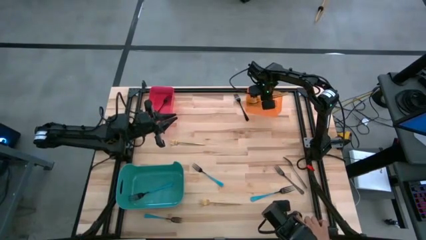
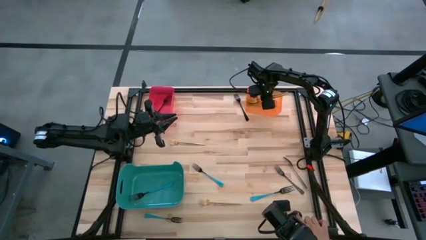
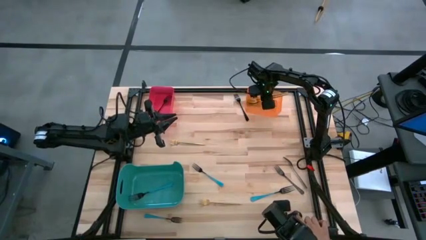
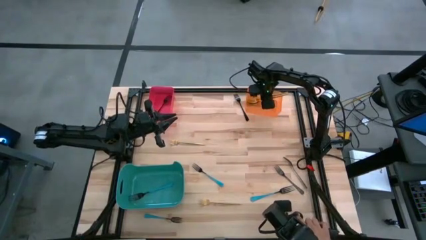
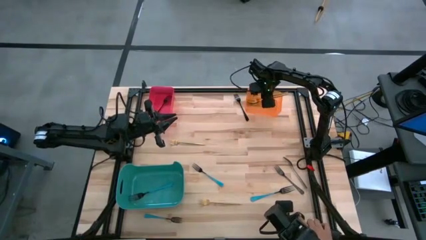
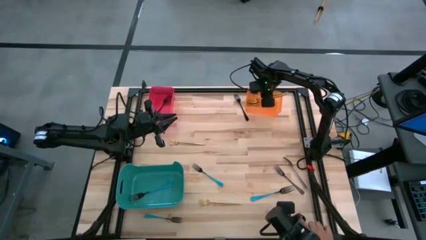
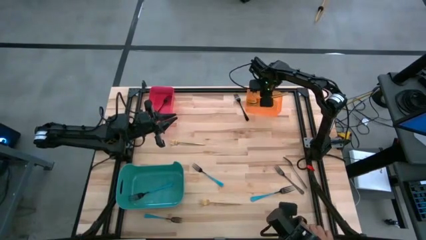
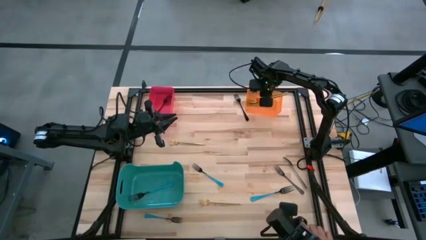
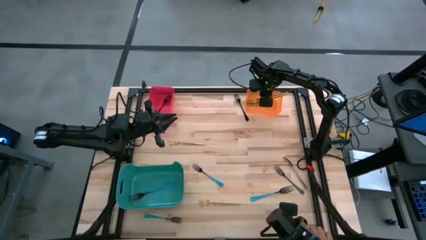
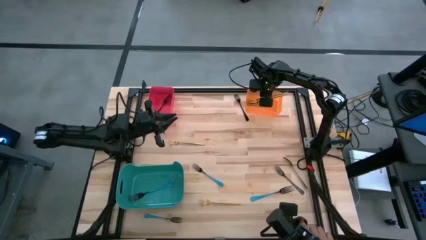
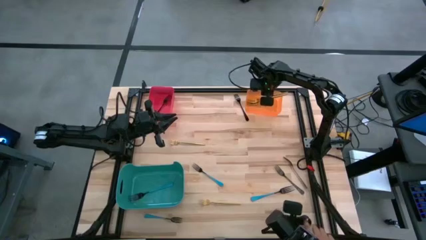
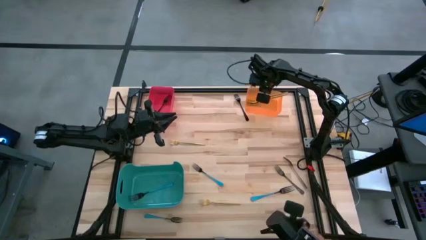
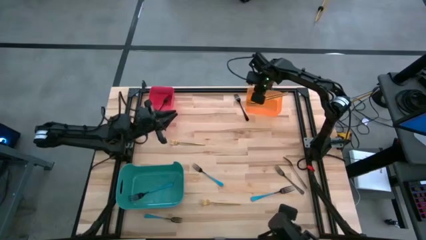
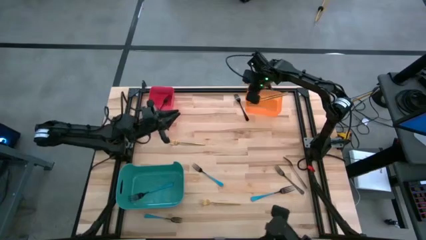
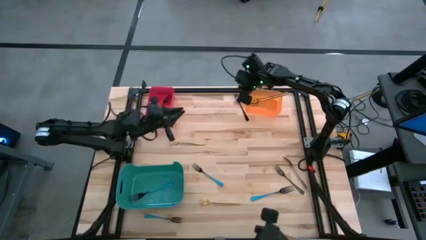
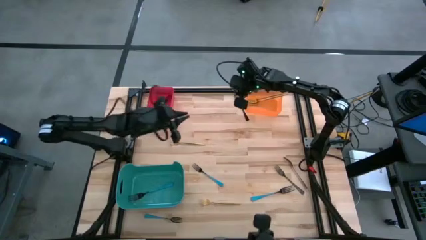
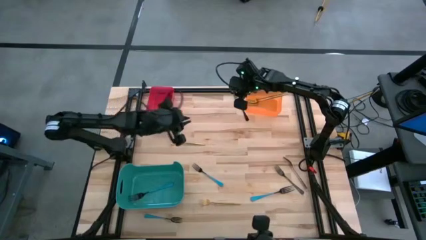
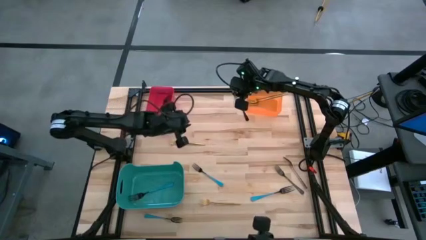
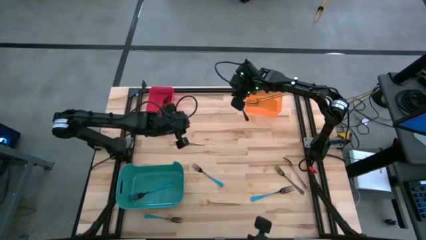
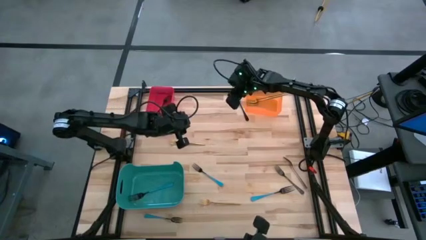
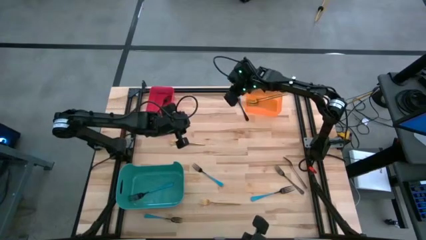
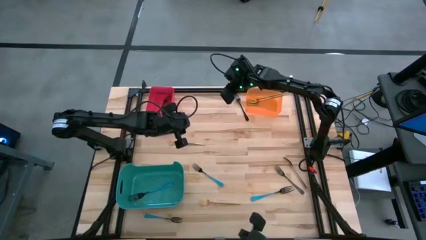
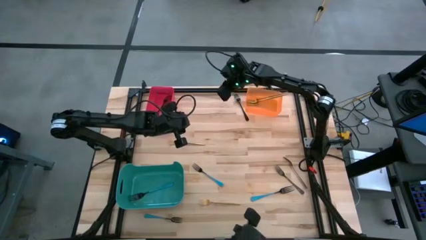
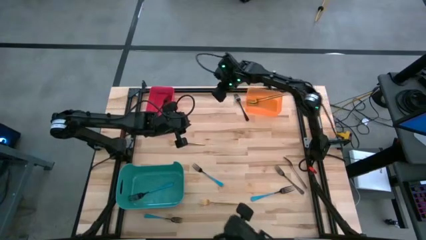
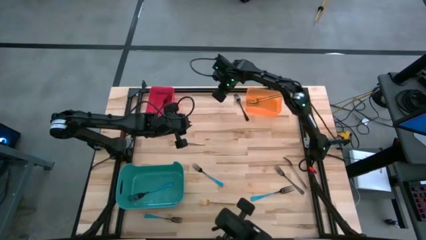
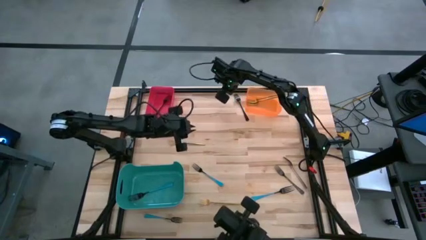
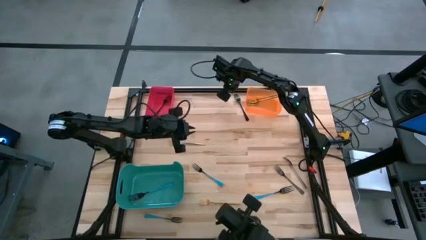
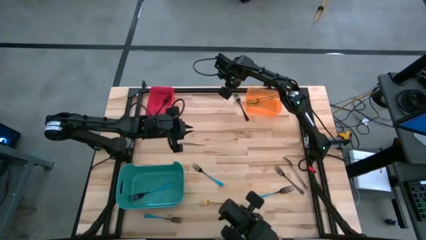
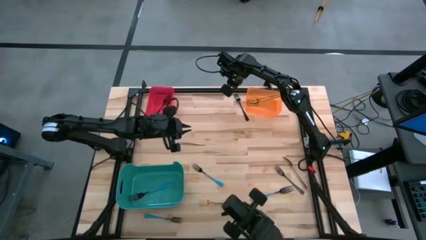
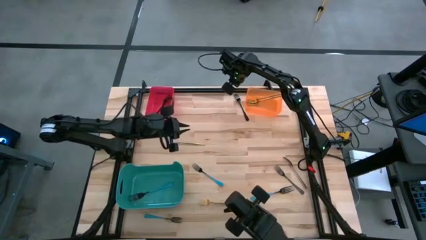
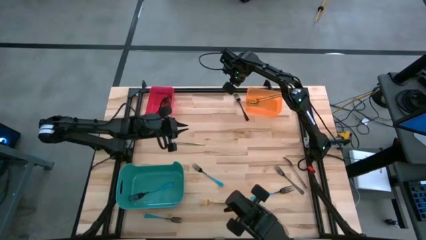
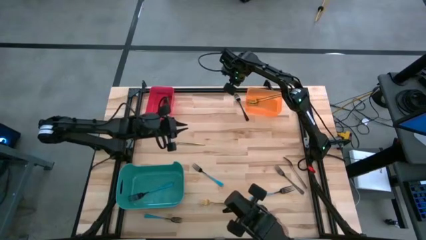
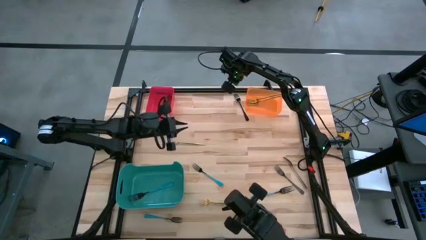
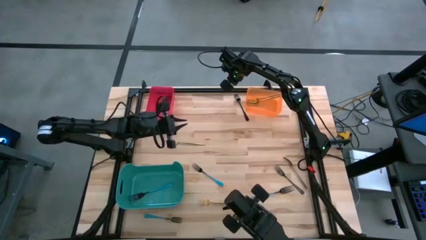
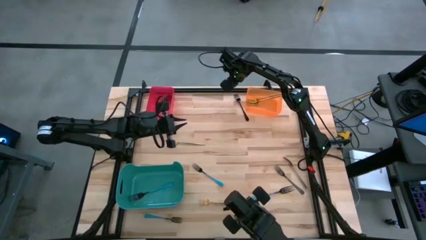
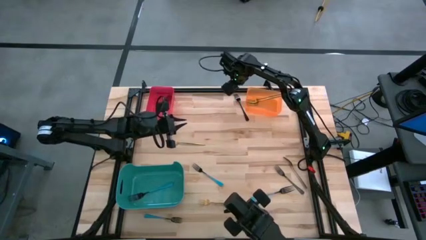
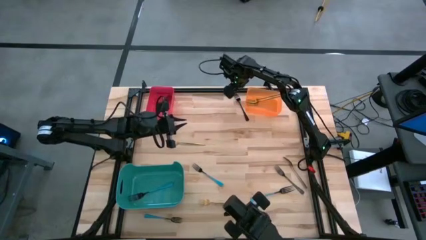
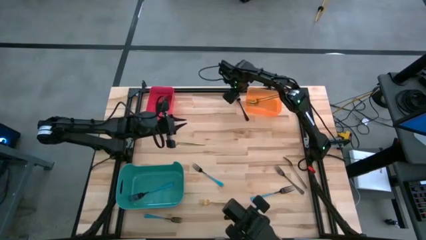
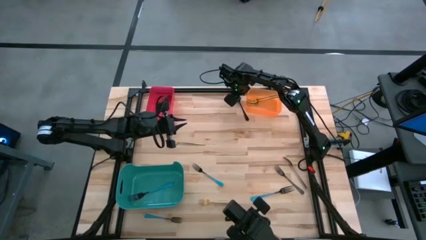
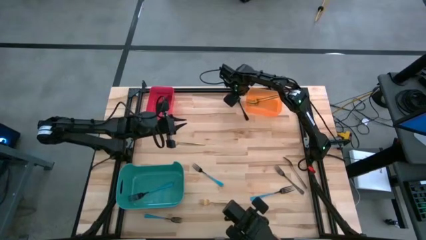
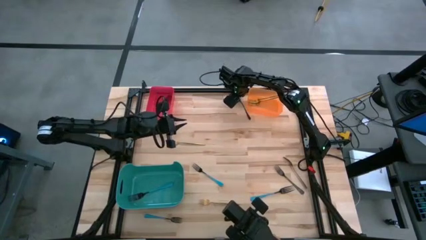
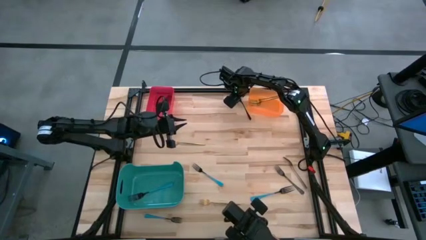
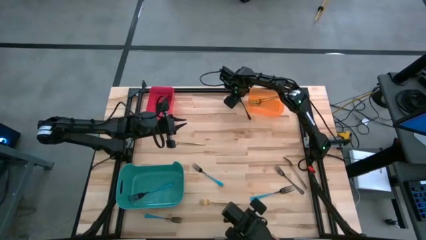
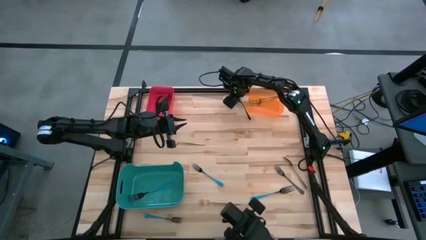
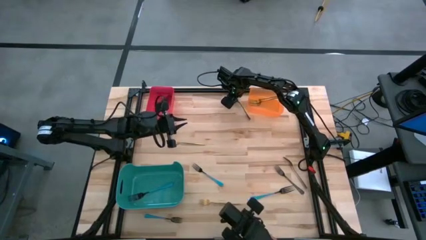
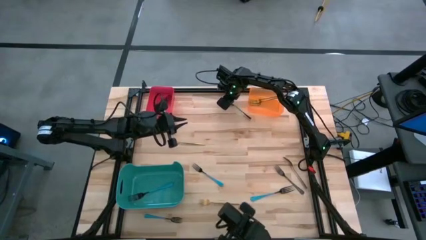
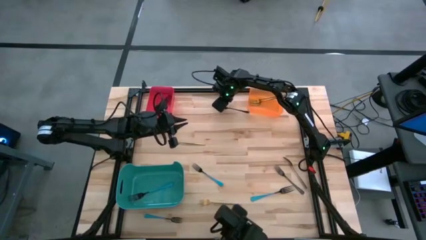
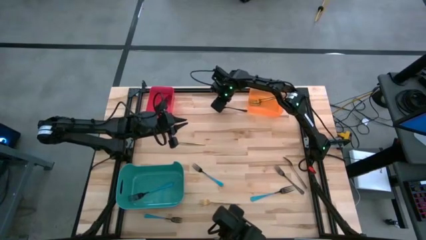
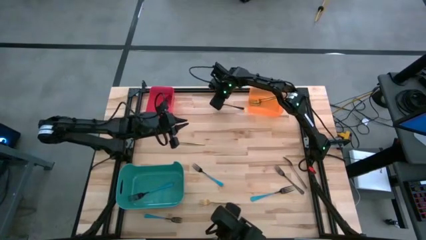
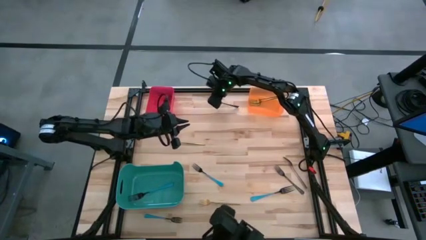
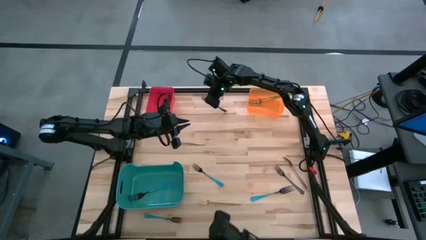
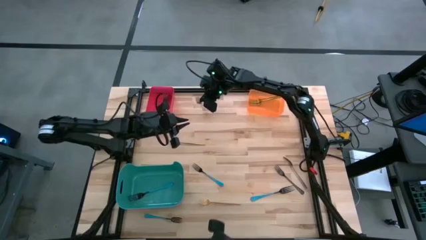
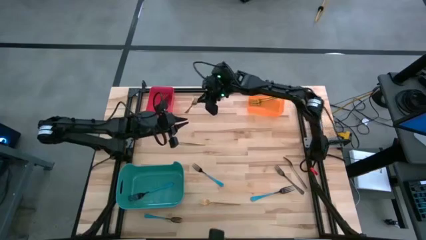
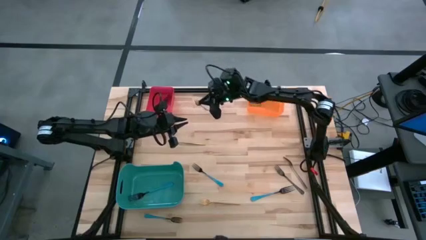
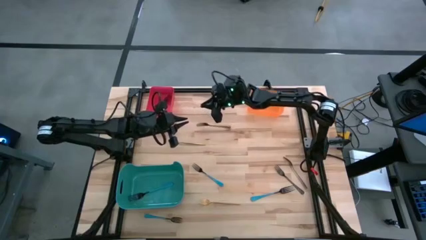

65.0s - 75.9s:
Task: Sort silverware by color (type)
Put the black fork into the red bin
